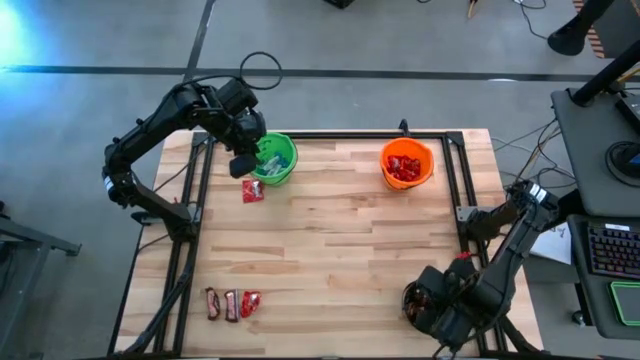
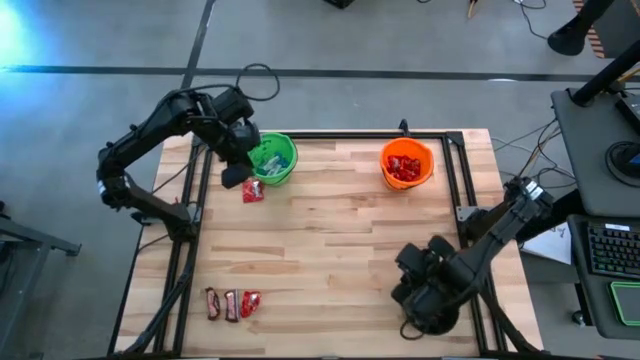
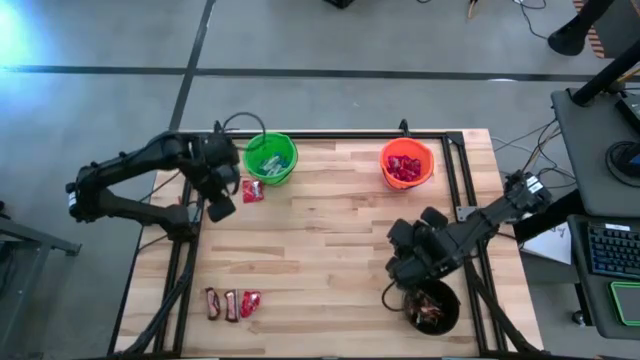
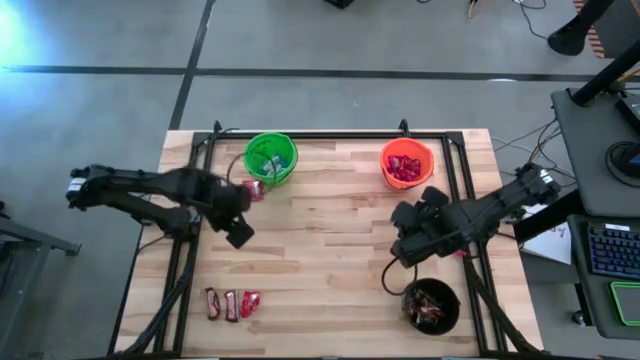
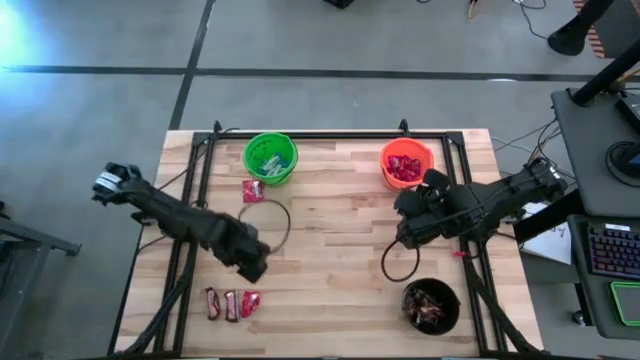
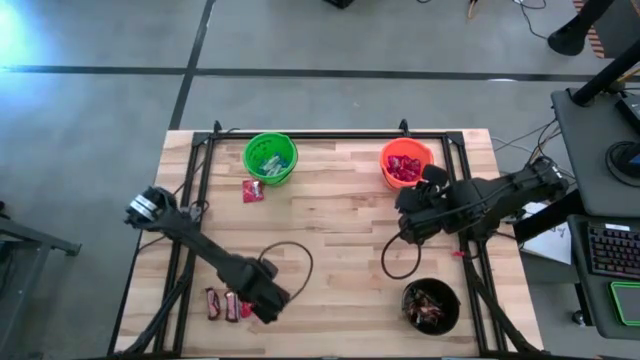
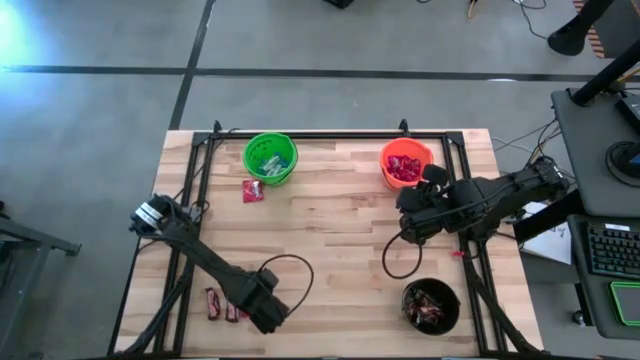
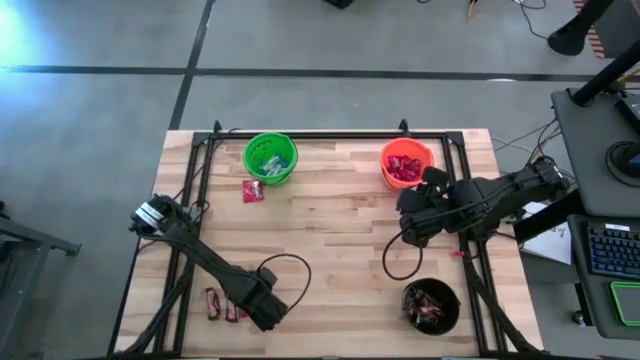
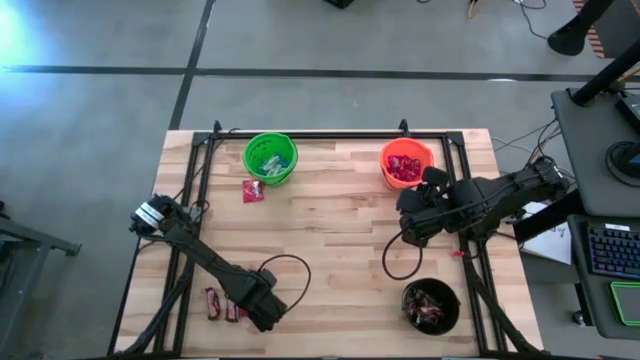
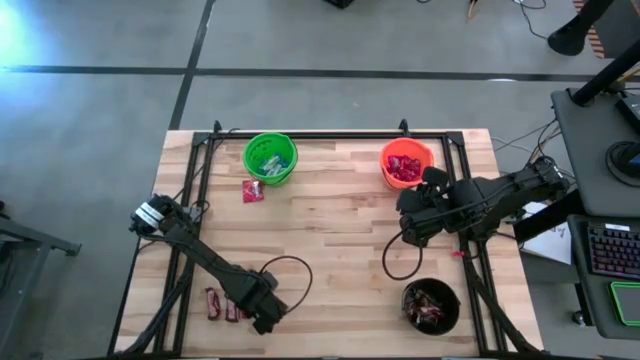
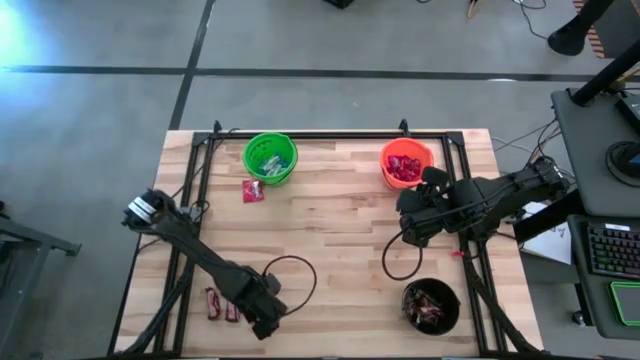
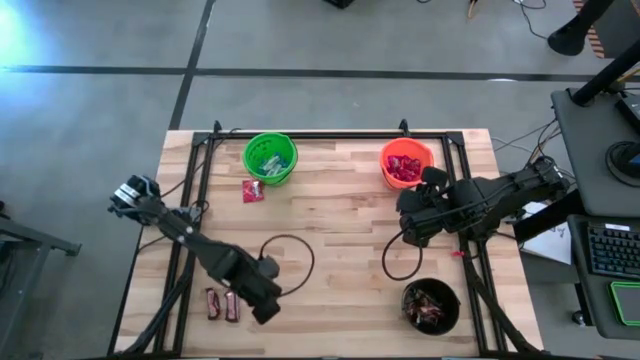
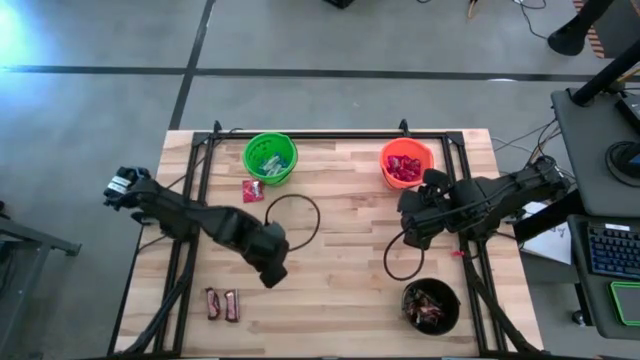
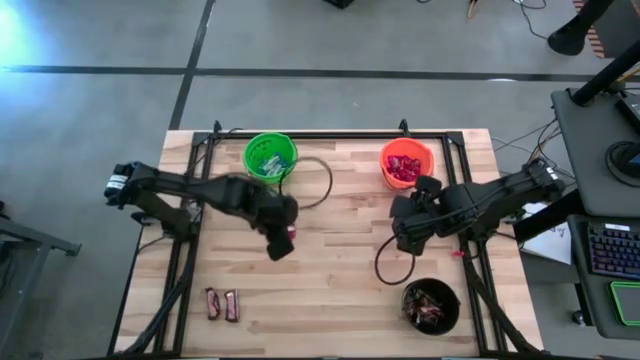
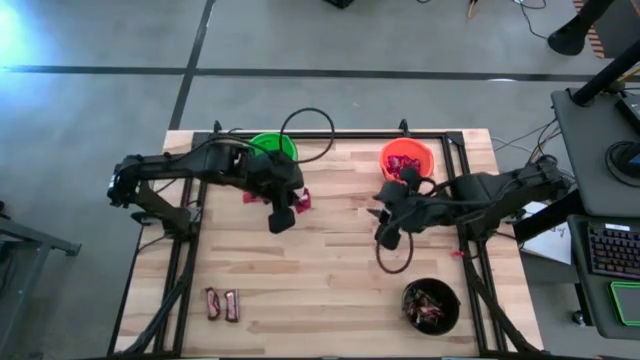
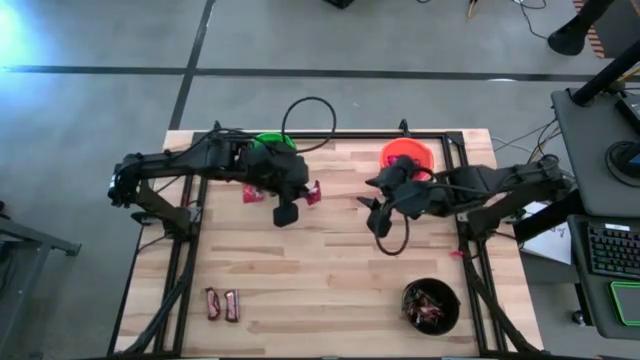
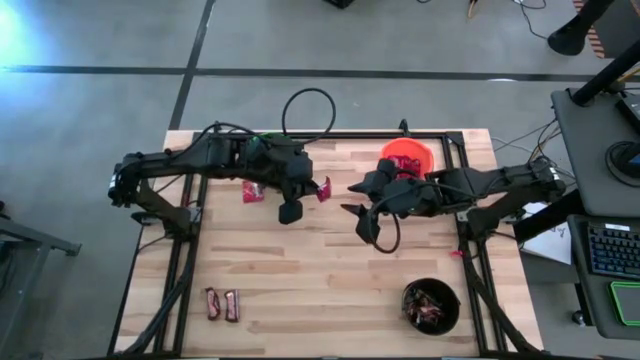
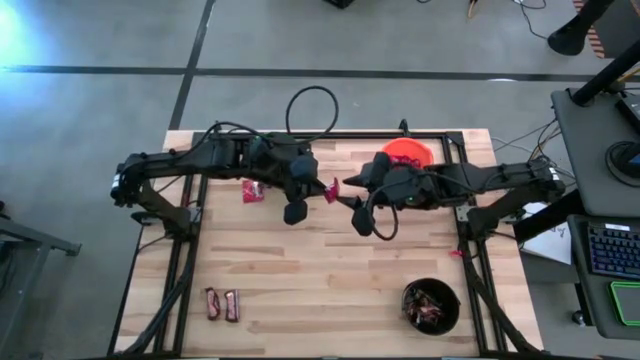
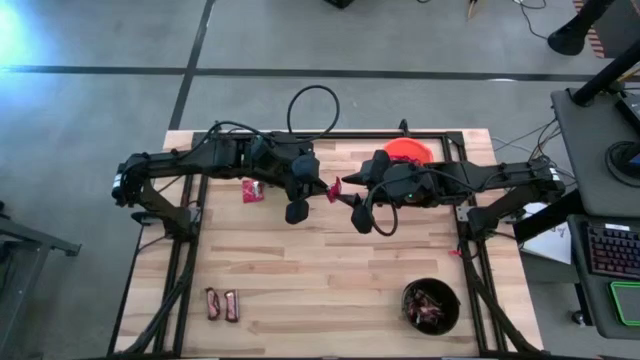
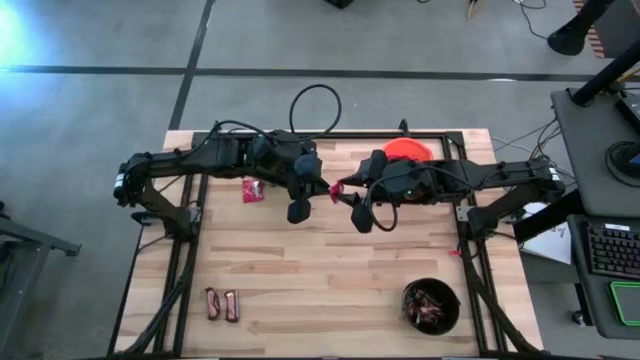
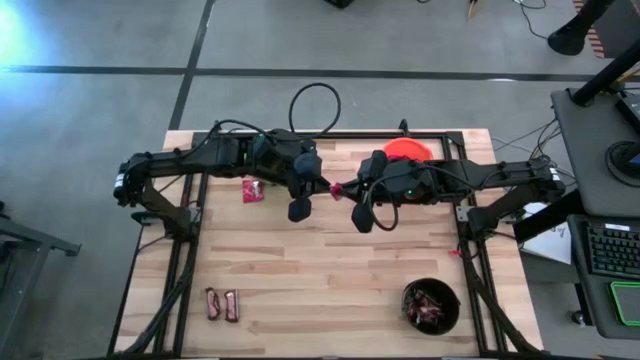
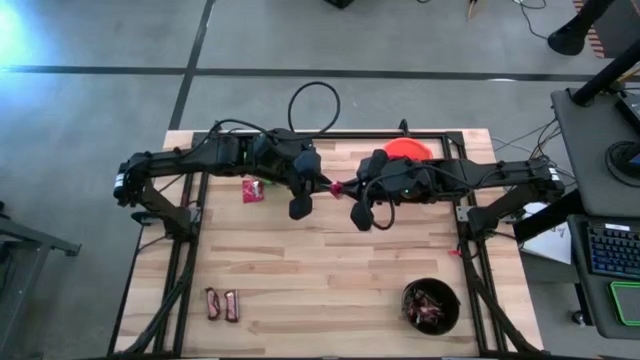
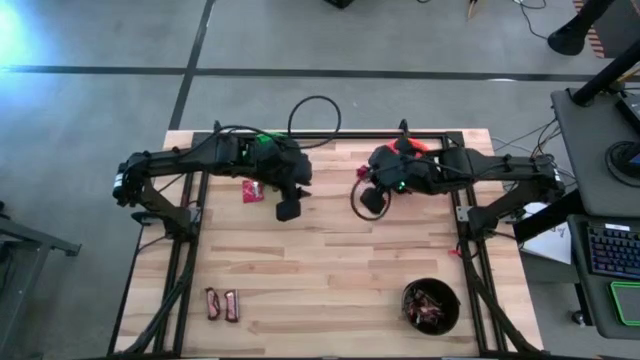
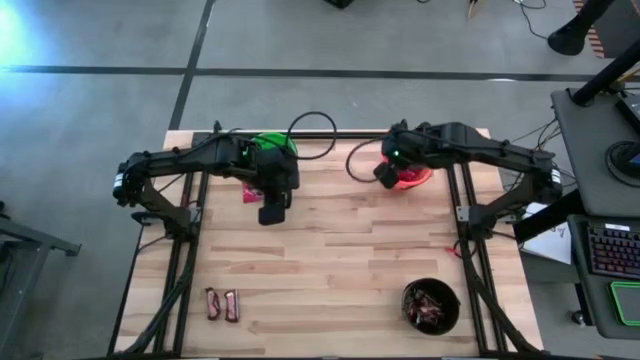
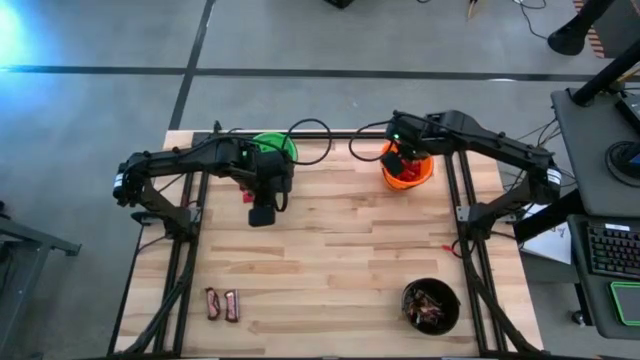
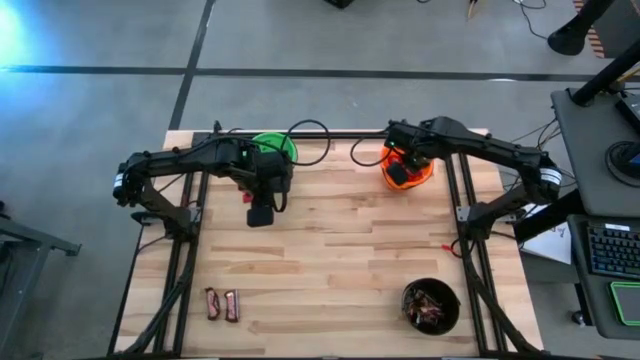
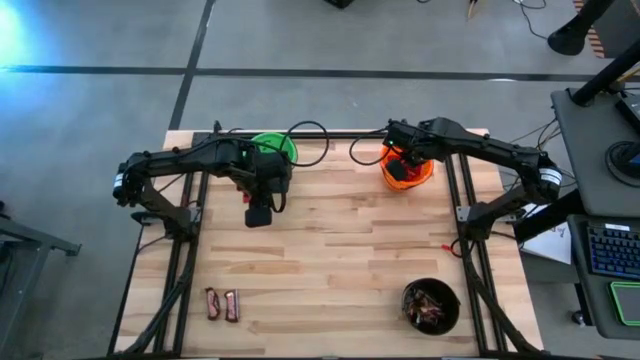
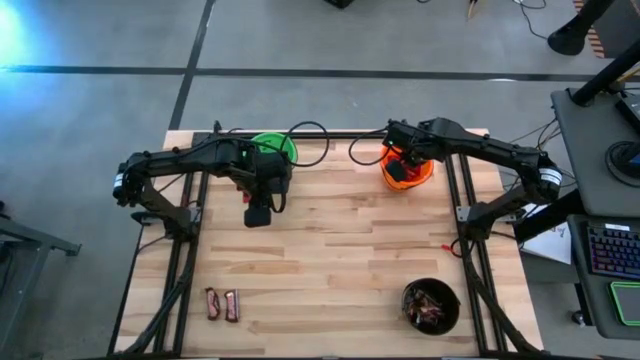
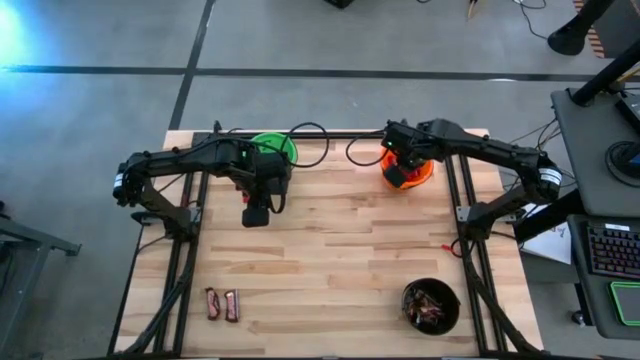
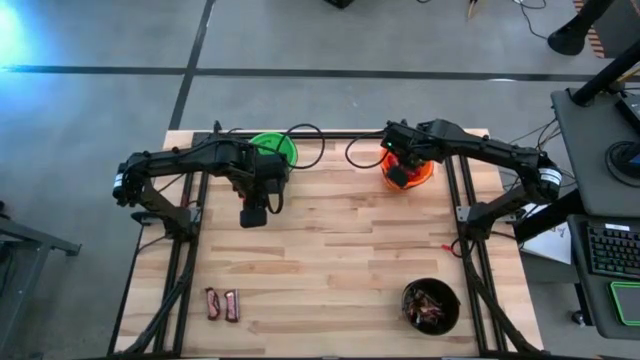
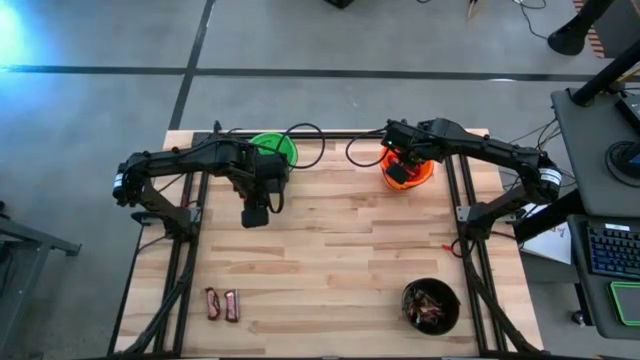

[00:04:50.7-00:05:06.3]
Task: Sort candy
Put the red candy into the orange bucket

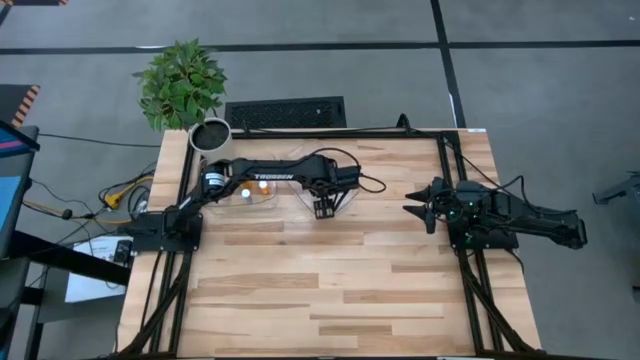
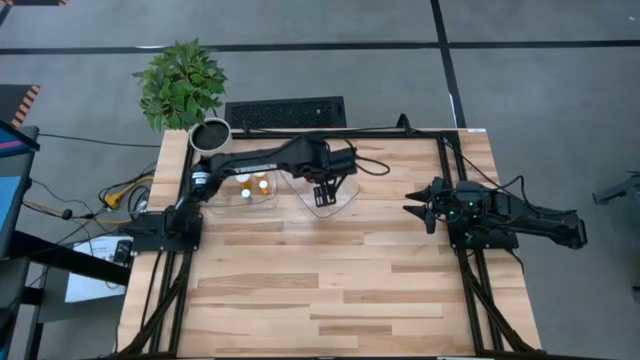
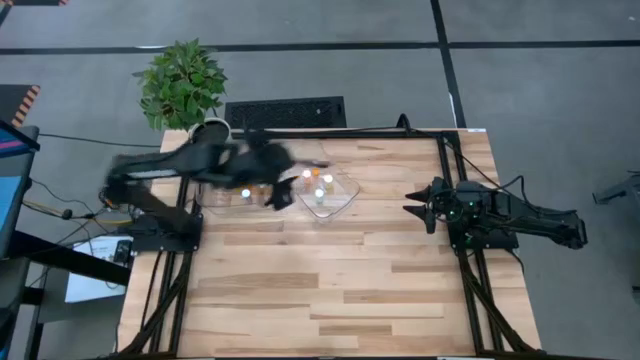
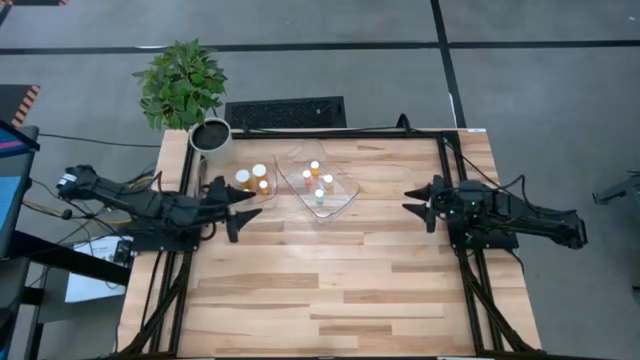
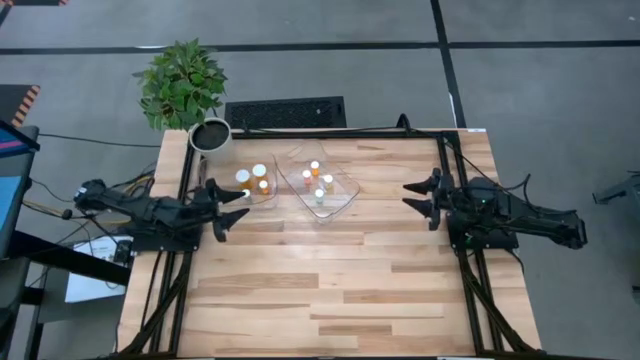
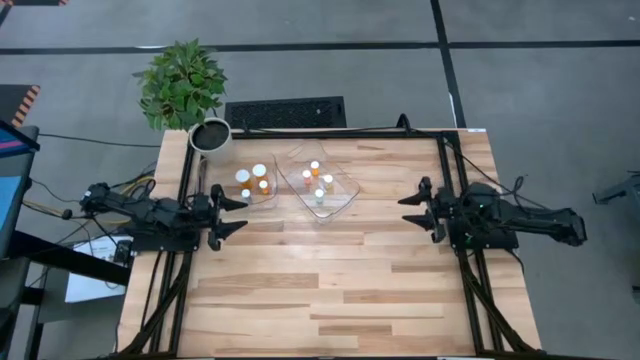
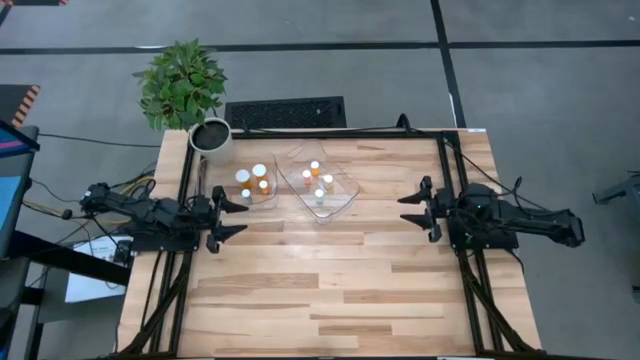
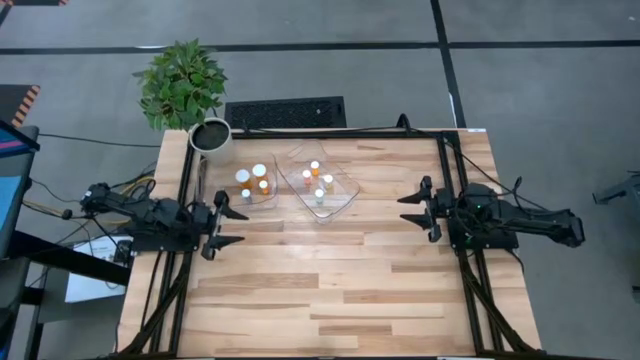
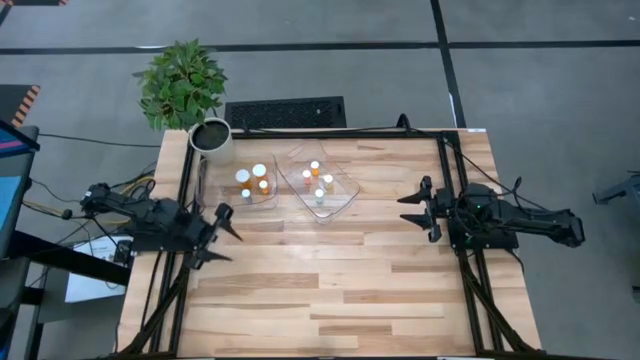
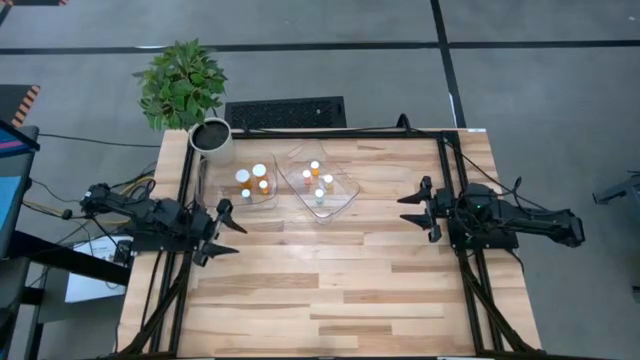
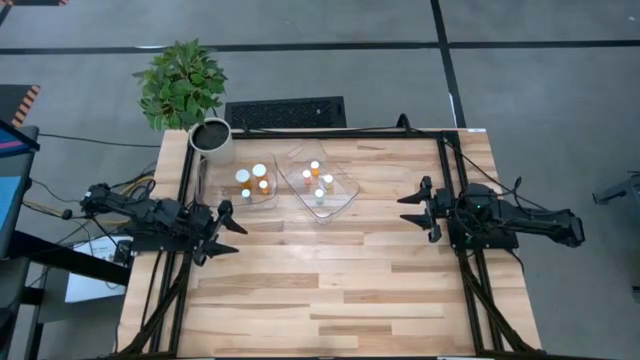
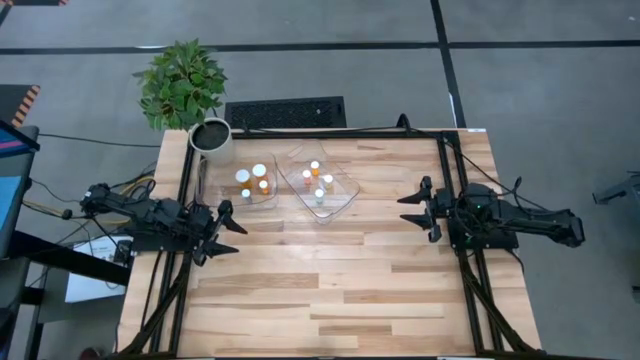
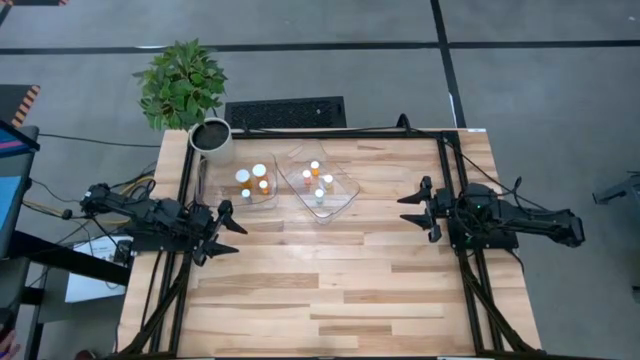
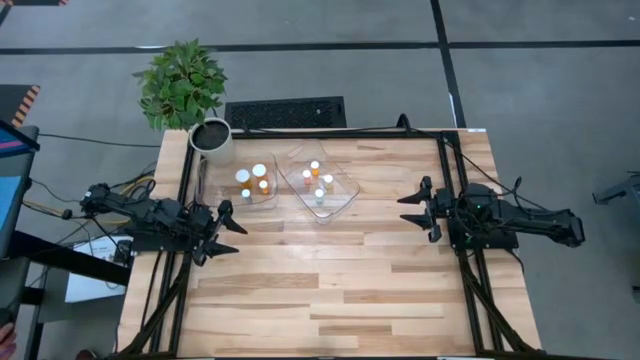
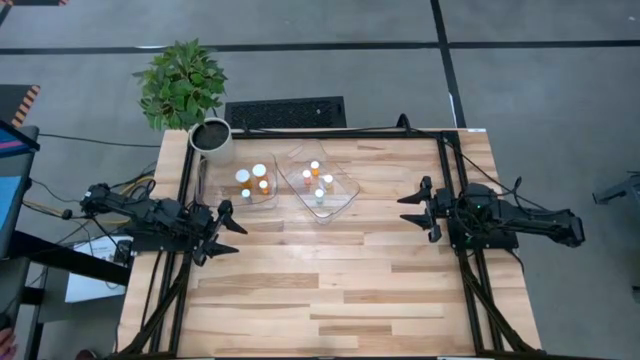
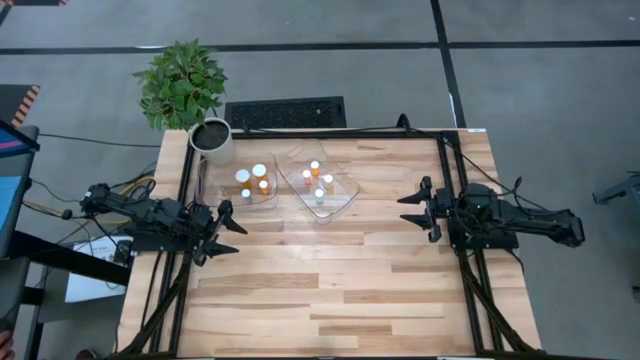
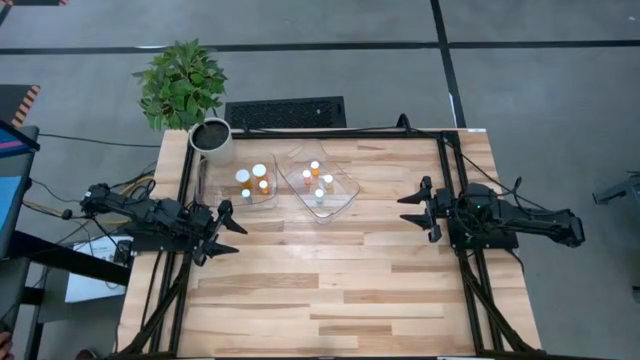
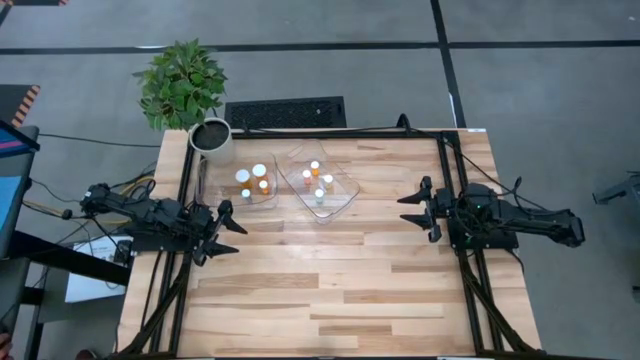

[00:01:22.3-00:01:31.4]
Task: Pick and place medicine bottles into bin by pill shape (circle, oval)
Return to Home Position
